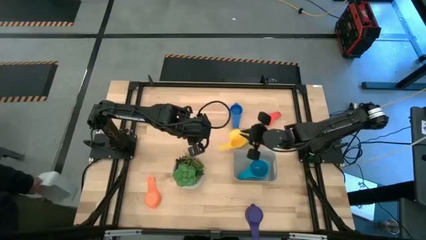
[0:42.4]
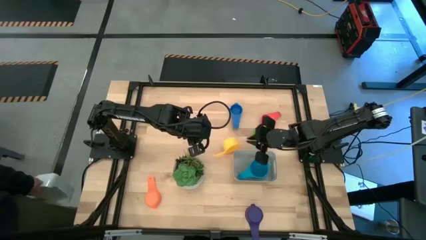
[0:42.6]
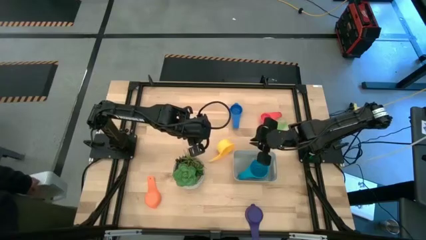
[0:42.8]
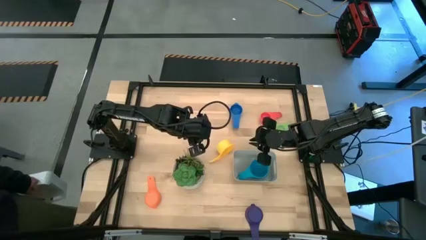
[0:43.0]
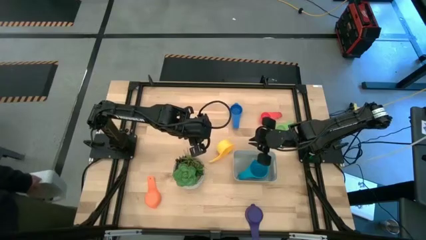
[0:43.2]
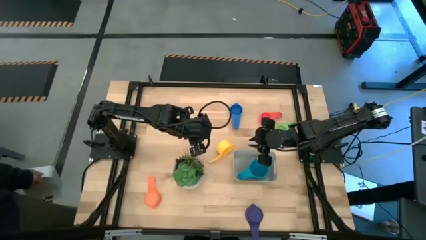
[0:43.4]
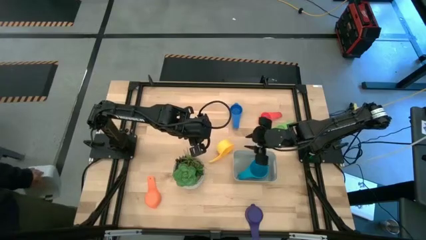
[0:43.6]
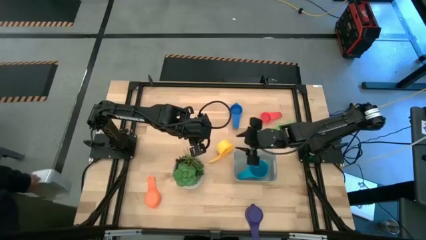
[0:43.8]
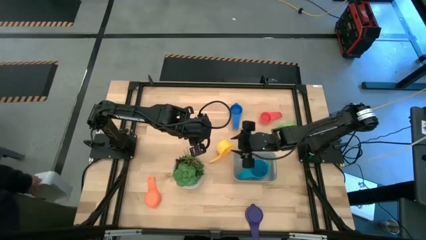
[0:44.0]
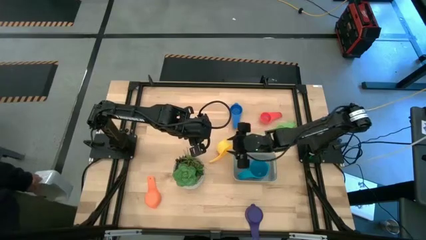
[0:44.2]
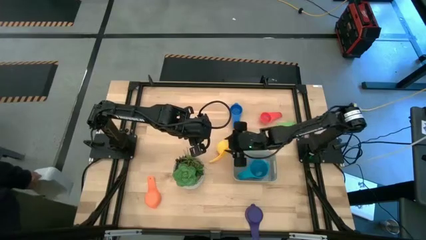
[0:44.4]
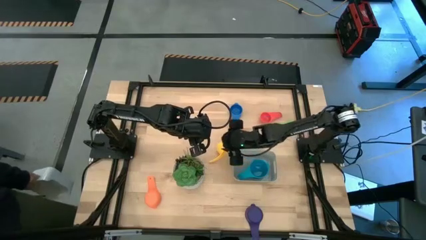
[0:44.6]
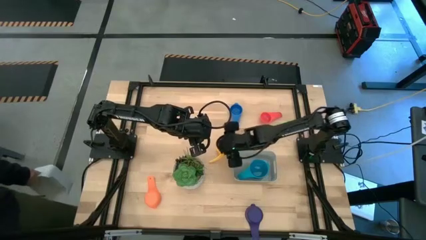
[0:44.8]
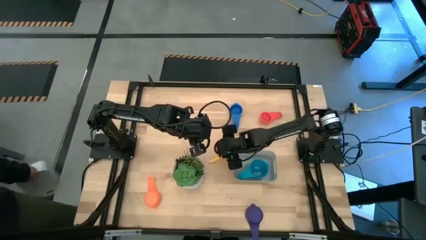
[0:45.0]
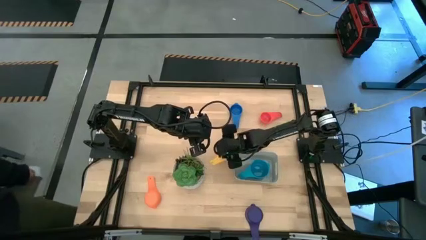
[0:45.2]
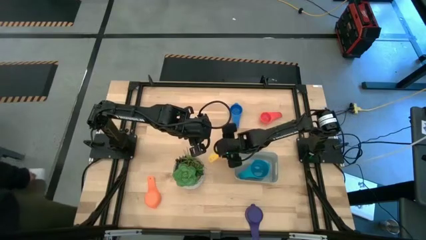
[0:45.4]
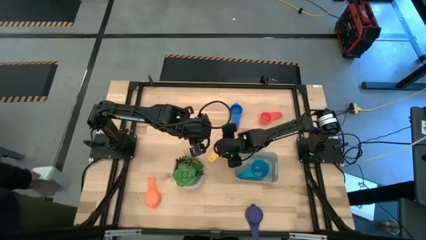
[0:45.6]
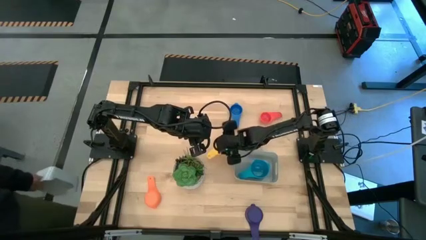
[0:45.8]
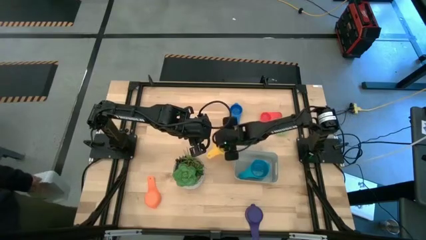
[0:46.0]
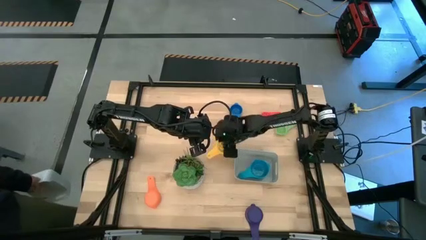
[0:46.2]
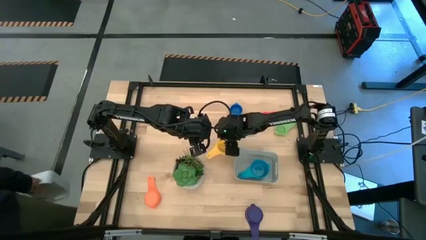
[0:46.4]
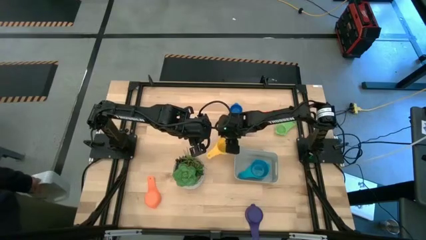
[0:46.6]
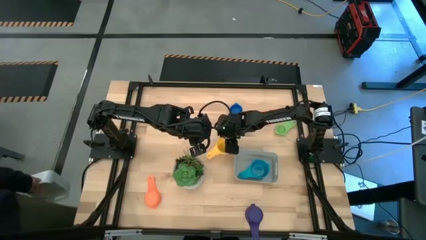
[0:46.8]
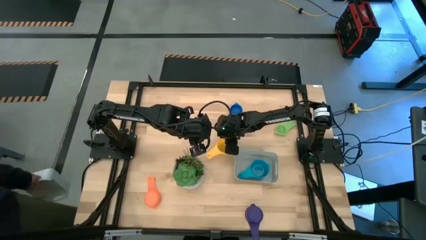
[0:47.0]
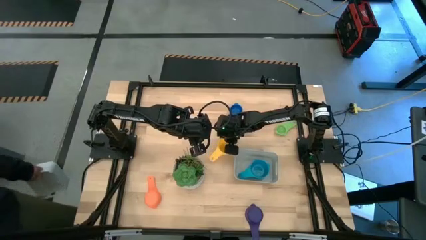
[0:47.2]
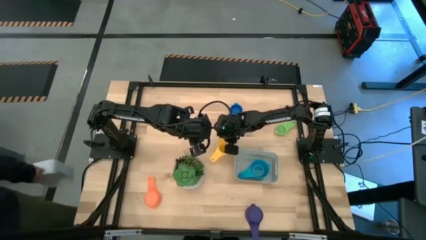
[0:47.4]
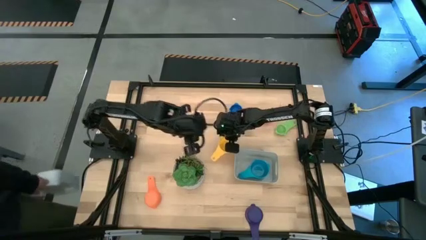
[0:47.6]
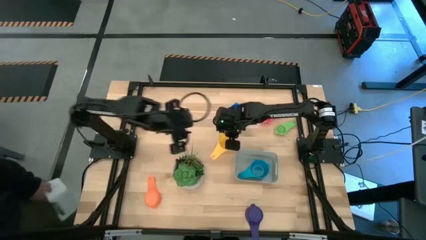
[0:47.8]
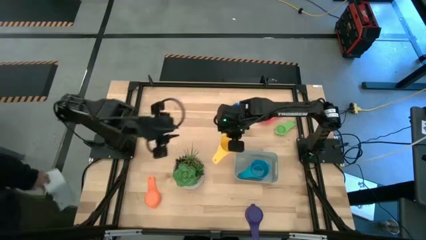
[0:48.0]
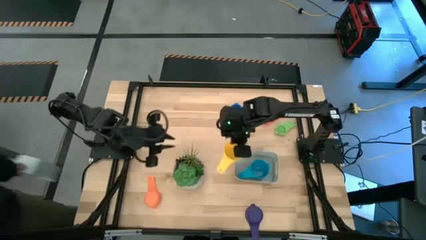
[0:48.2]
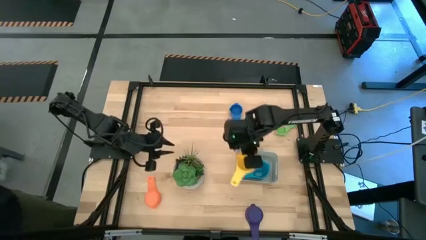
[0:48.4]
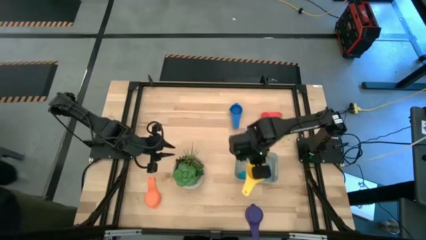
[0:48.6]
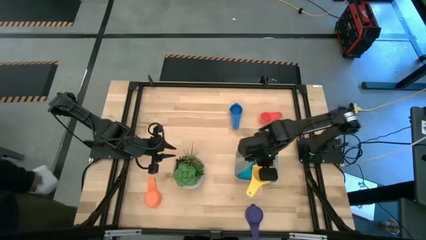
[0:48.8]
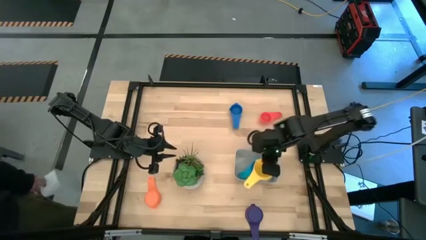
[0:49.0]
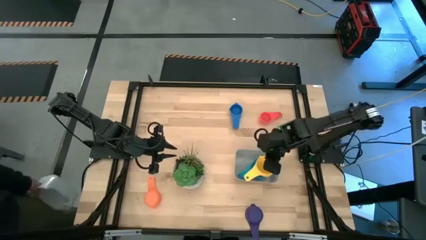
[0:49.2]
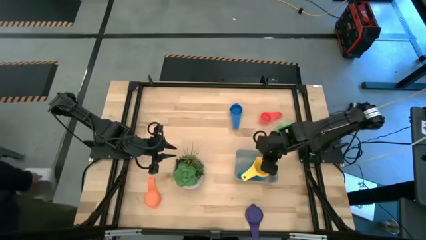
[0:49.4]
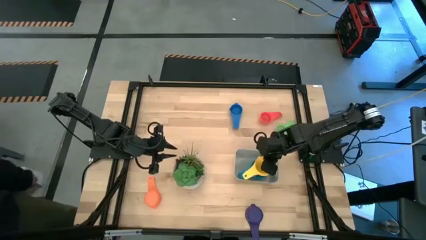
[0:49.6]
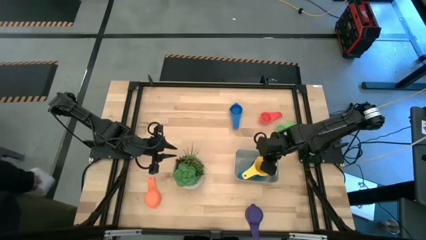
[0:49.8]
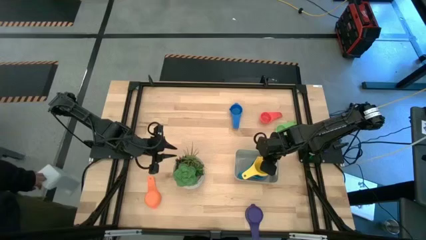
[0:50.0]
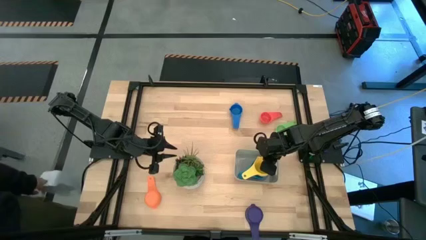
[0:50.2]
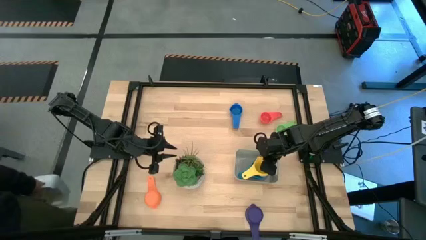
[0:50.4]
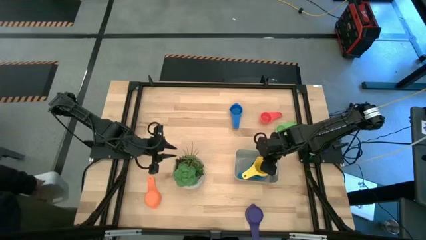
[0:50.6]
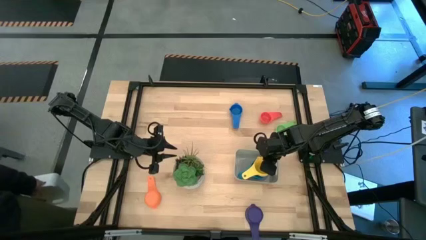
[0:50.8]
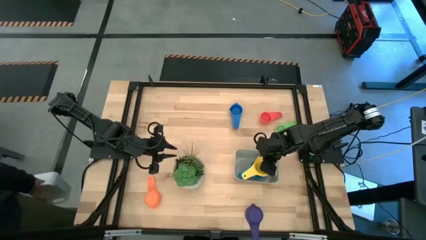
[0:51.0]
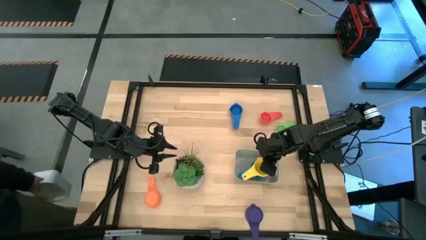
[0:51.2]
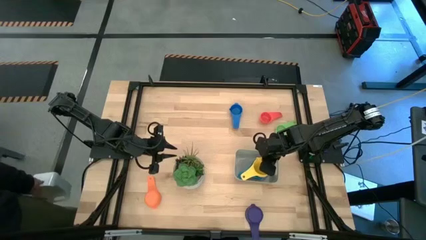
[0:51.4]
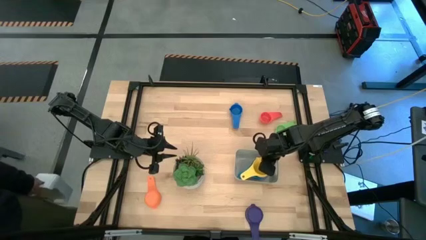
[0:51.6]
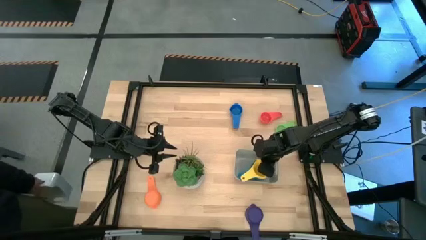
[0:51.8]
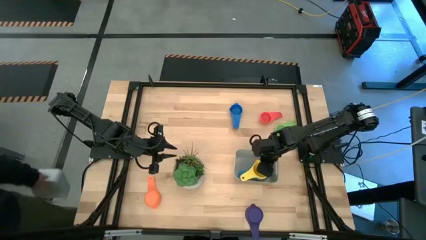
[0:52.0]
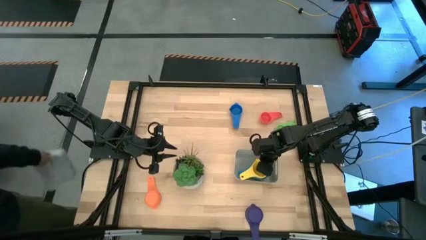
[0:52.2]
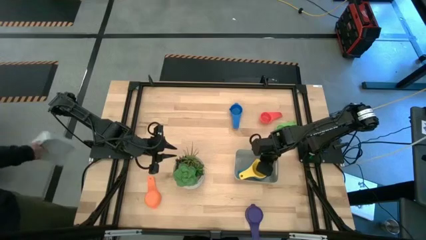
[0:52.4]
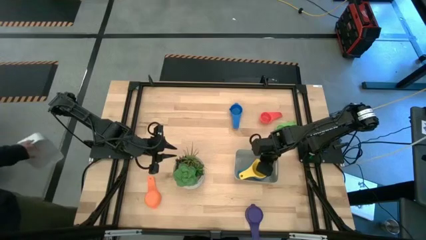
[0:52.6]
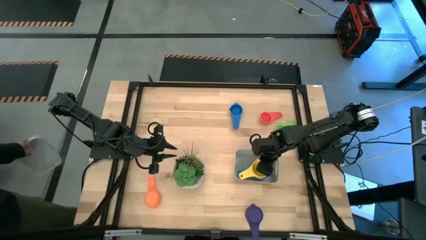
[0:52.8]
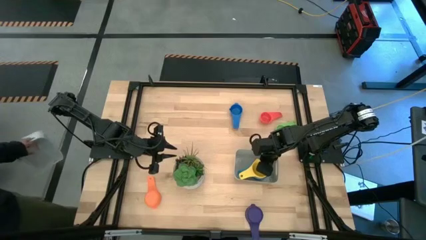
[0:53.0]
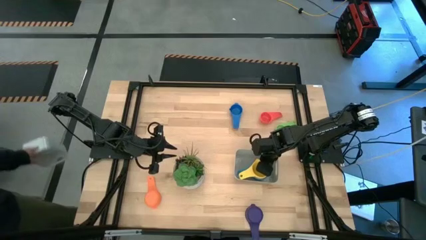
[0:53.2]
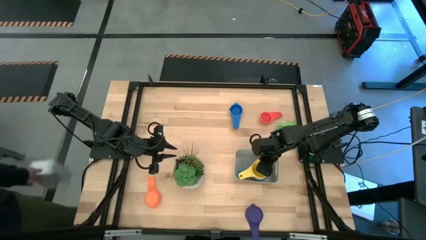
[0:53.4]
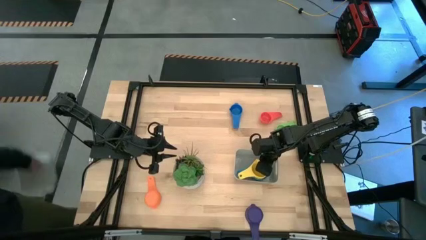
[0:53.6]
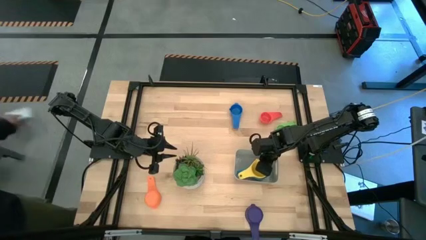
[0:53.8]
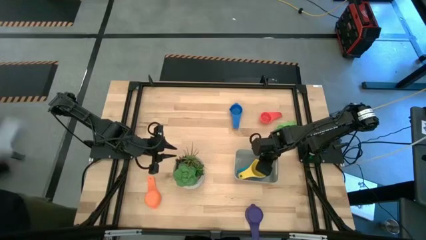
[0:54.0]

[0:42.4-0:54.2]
Task: Nest measuring cups in basket
Stack the yellow measuring cup on top of the blue measuring cup in the grey bin
